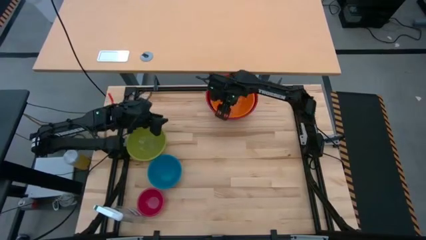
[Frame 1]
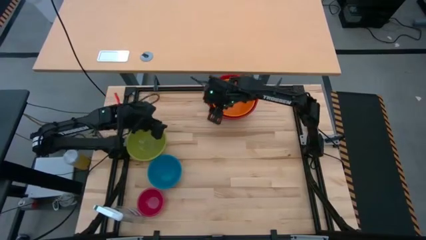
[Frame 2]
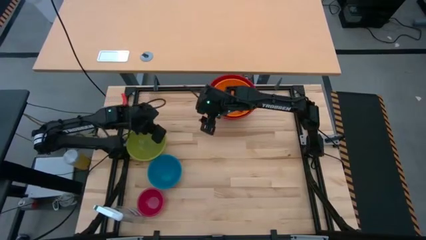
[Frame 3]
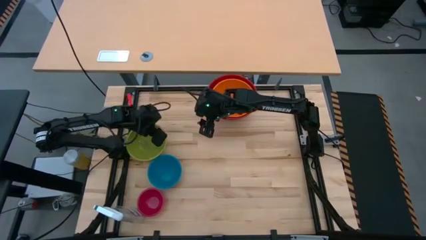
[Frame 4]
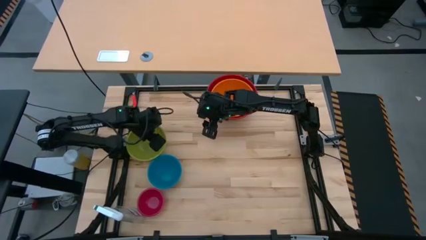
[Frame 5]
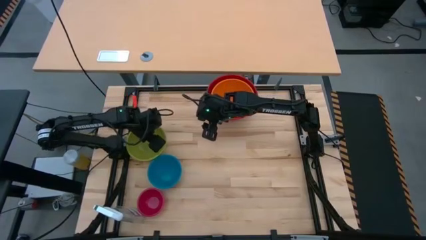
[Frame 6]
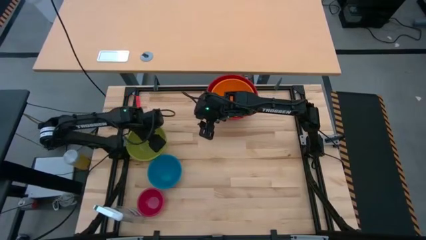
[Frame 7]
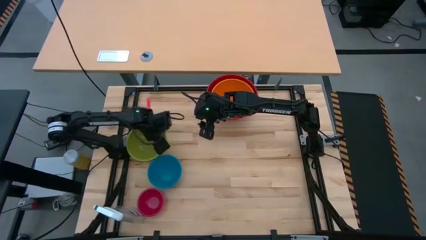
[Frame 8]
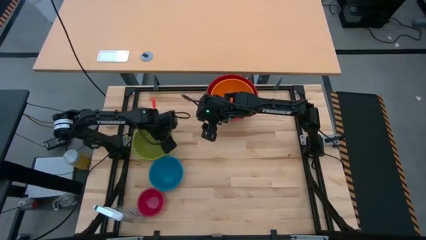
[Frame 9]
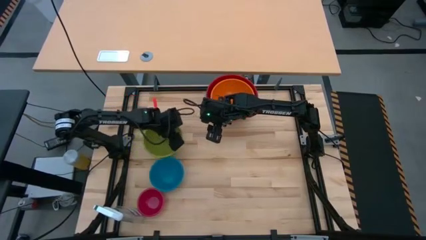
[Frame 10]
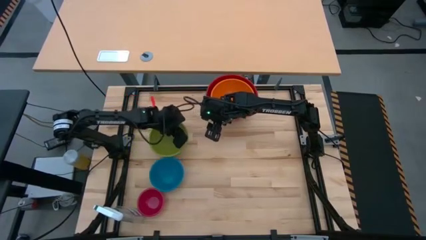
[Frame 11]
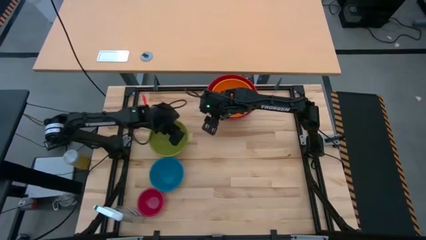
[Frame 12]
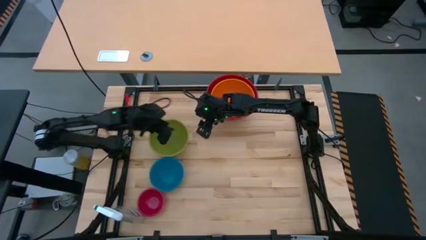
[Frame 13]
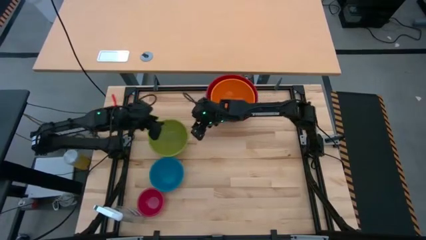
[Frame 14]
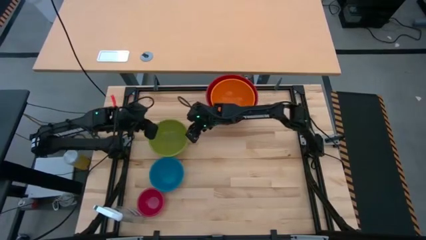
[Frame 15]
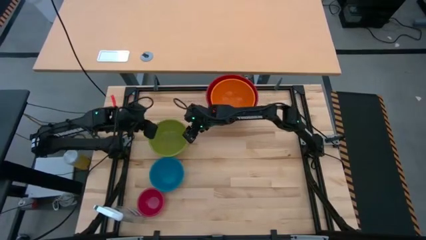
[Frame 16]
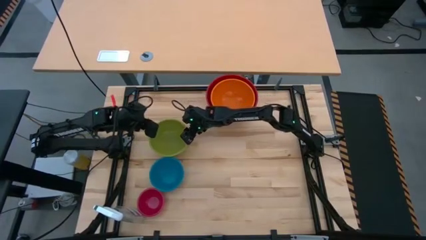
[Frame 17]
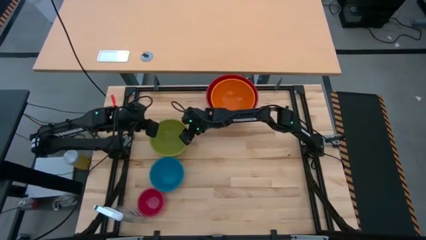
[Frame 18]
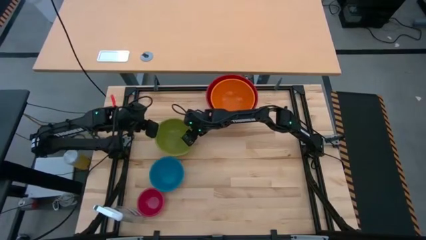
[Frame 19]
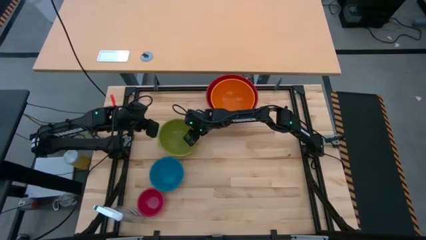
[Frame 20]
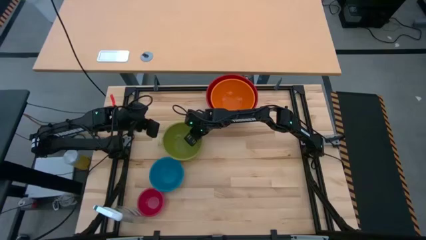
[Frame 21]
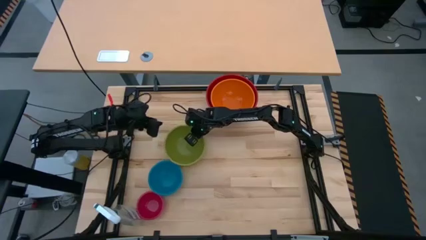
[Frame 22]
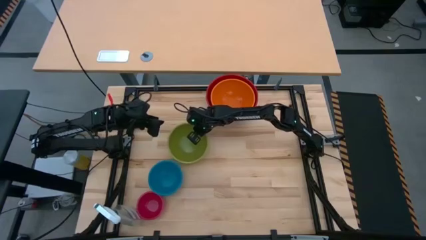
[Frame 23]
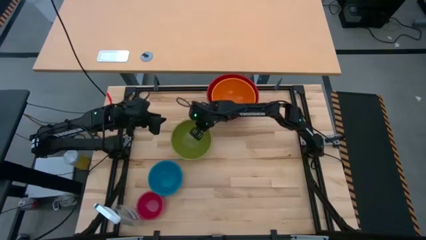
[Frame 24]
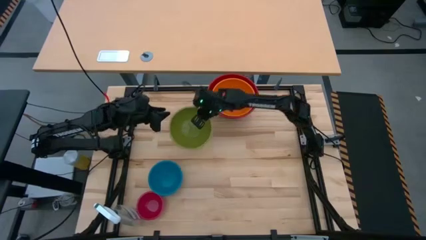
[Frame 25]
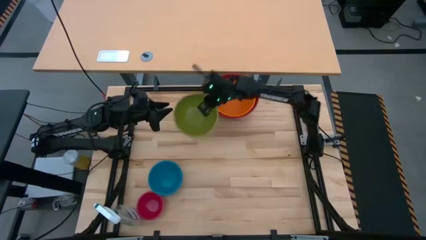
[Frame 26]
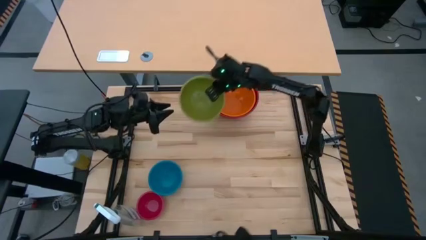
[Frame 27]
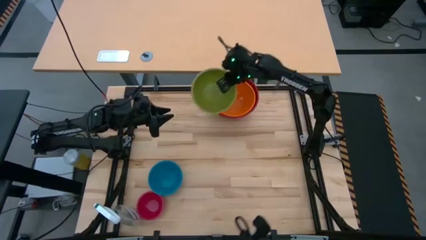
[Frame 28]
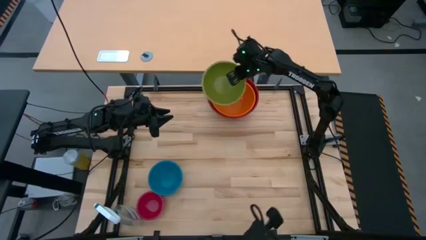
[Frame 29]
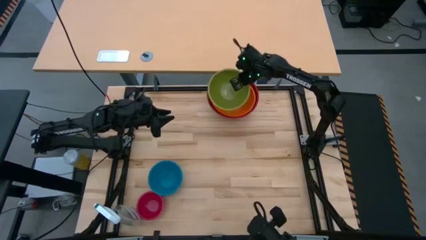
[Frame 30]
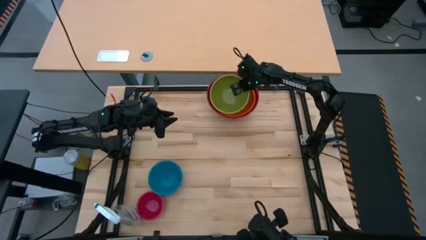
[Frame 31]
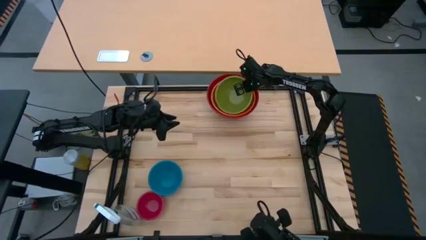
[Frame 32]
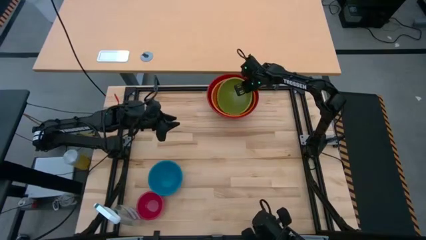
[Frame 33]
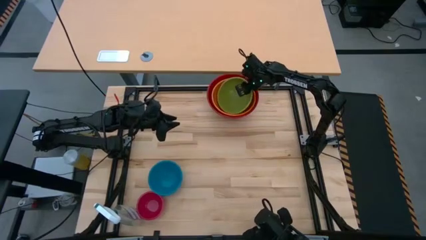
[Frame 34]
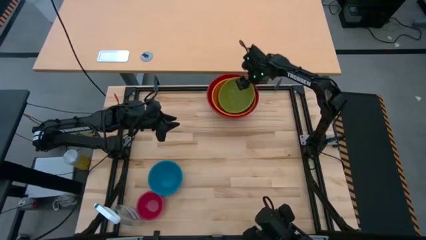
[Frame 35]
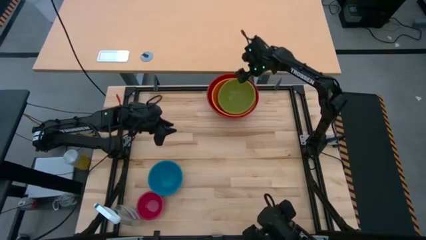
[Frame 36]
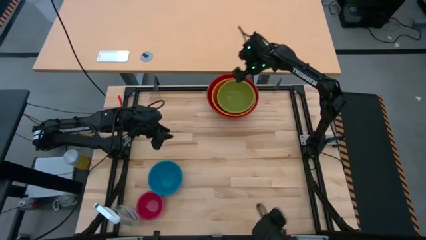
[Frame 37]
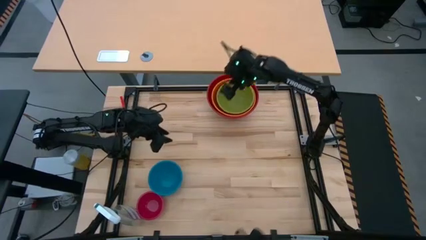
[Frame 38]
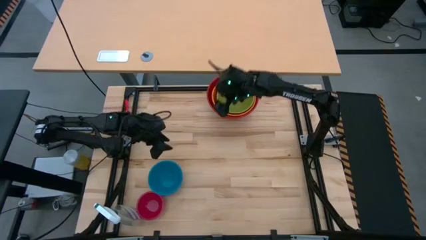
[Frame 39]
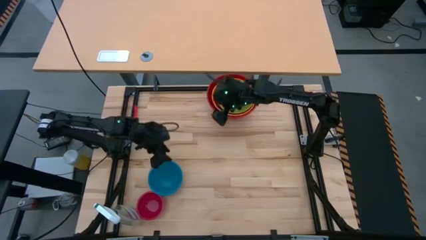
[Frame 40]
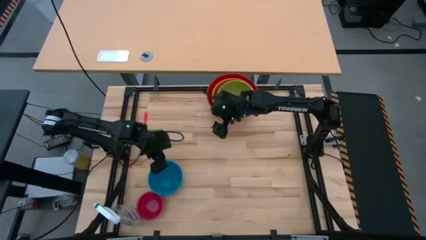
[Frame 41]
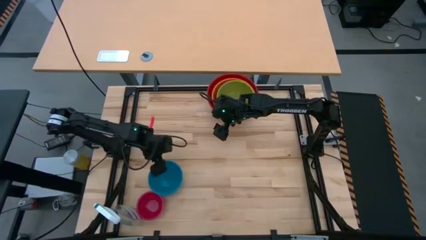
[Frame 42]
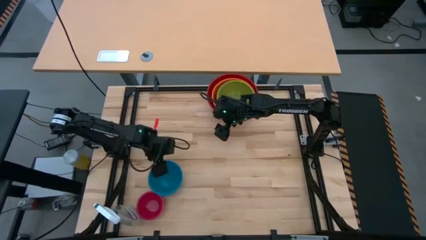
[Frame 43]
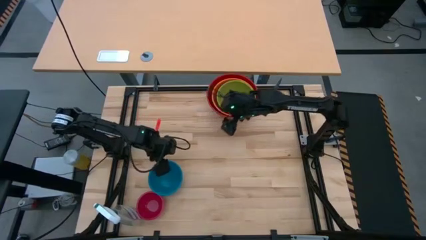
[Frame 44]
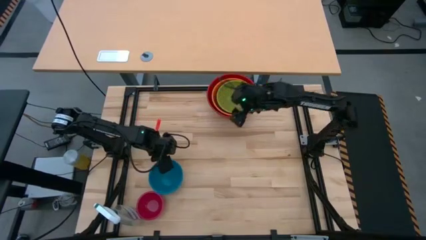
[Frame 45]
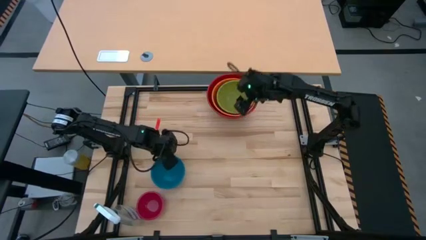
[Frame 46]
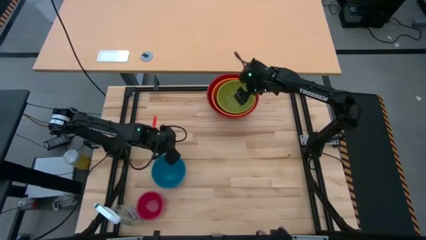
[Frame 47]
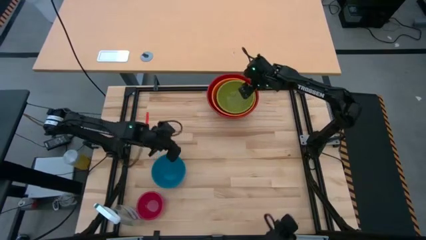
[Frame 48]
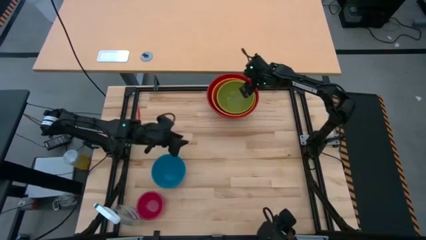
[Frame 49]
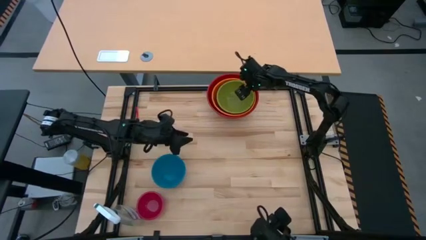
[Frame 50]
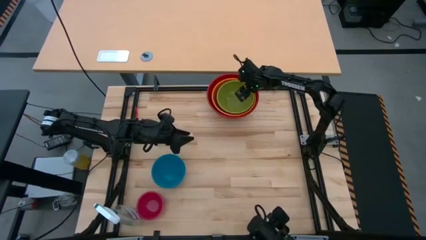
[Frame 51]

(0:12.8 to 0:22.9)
Stack the green bowl on top of the orange bowl

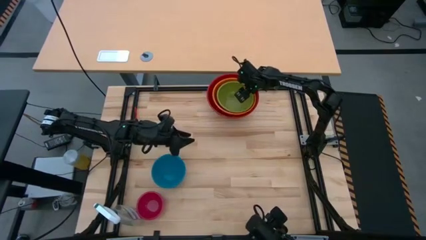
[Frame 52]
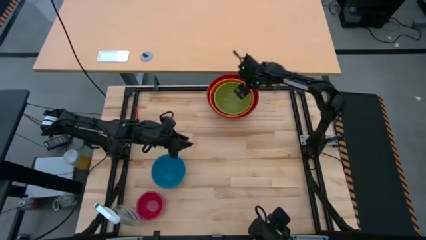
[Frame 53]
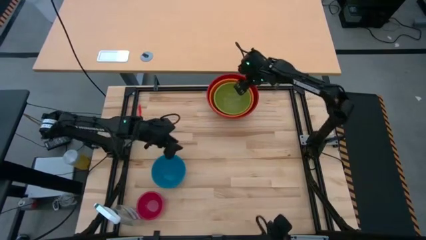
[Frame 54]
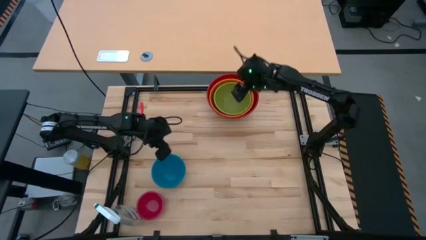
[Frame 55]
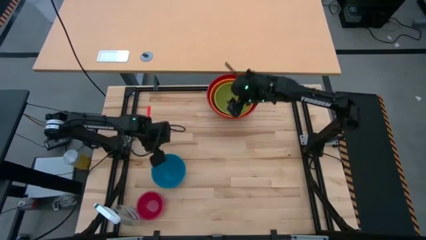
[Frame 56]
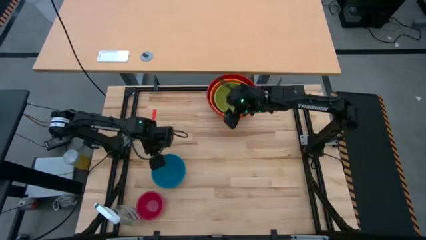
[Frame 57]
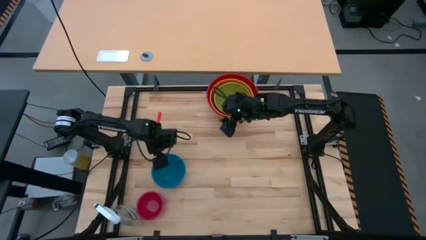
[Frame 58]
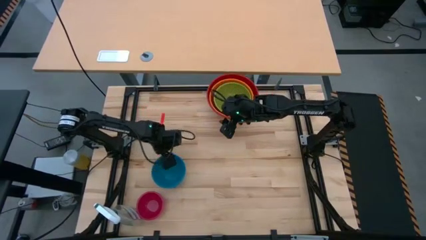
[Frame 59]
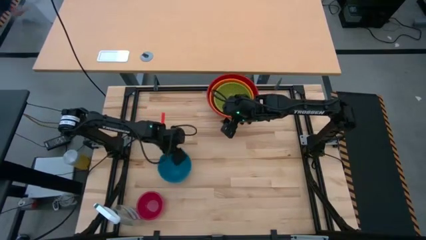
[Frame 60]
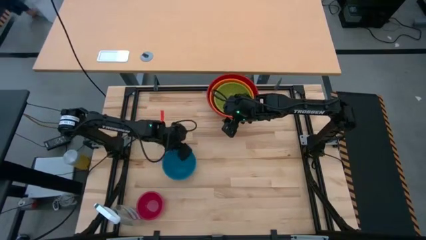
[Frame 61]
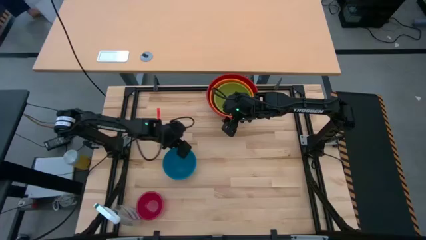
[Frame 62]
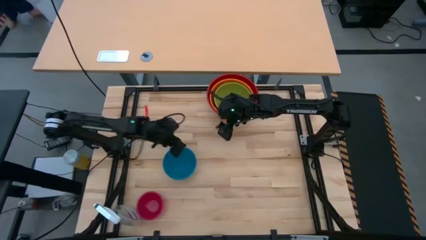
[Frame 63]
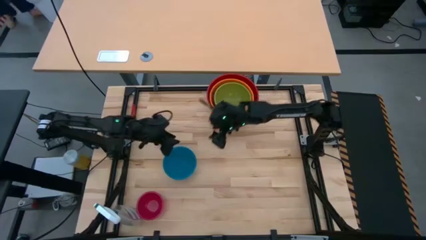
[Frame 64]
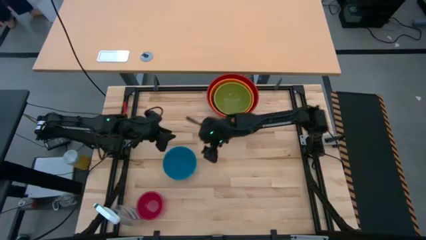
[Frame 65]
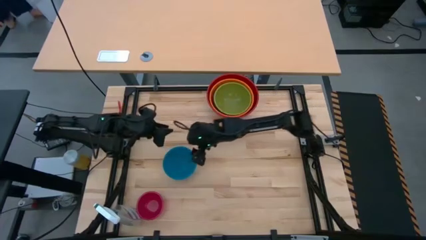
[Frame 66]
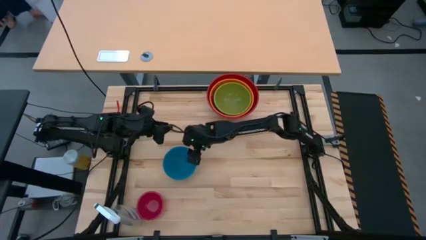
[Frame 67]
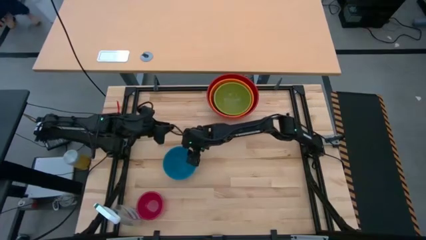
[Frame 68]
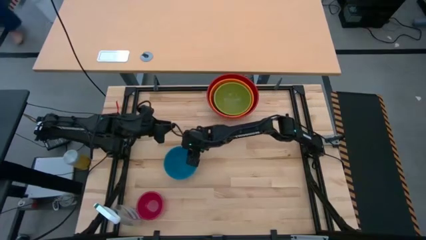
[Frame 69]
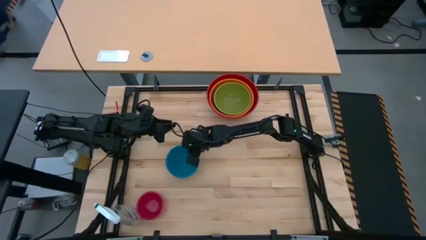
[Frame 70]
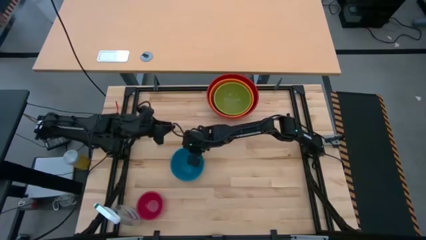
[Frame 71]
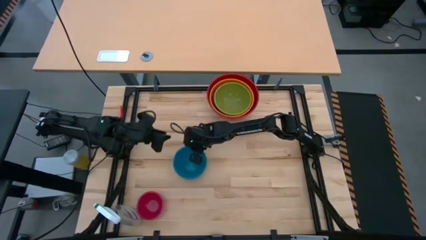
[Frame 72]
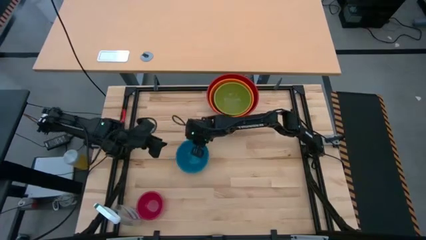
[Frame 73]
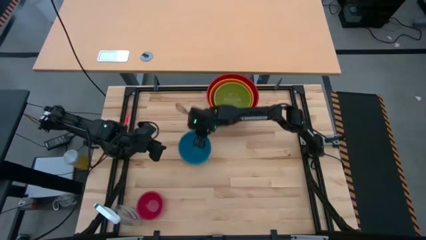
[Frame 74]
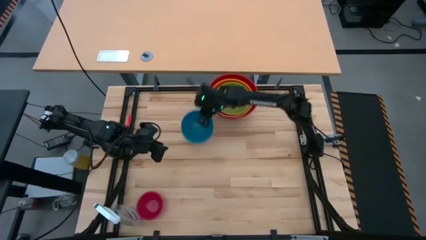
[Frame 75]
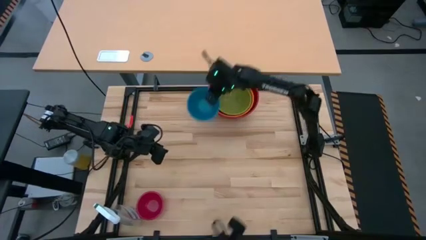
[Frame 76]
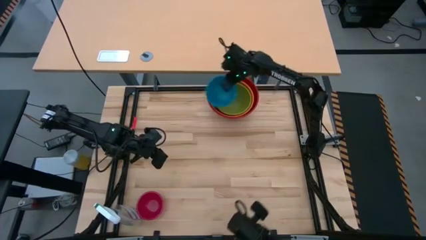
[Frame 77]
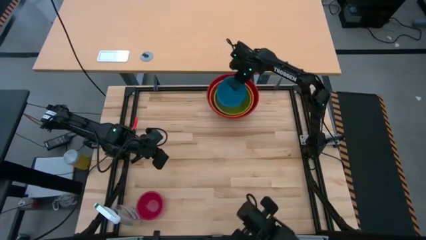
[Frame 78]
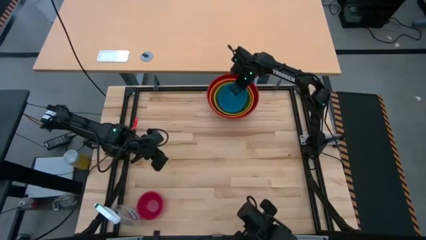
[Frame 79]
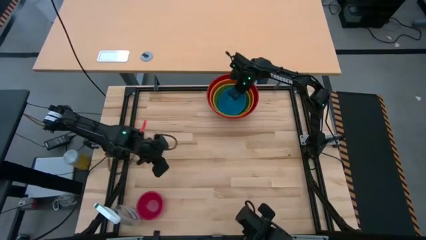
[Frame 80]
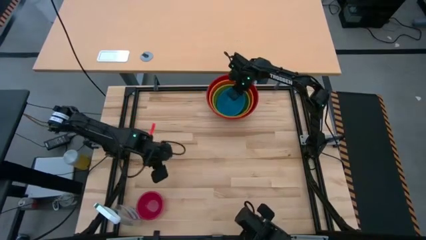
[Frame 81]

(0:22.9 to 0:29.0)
Stack the blue bowl on top of the green bowl
